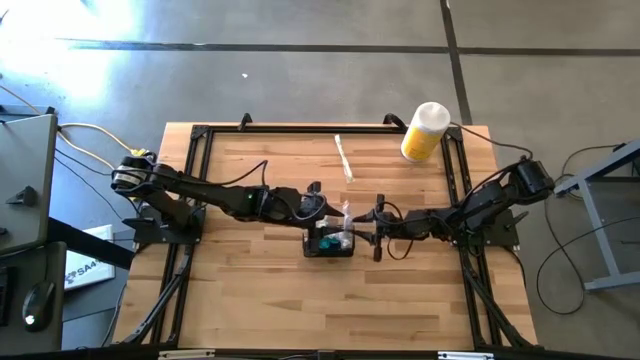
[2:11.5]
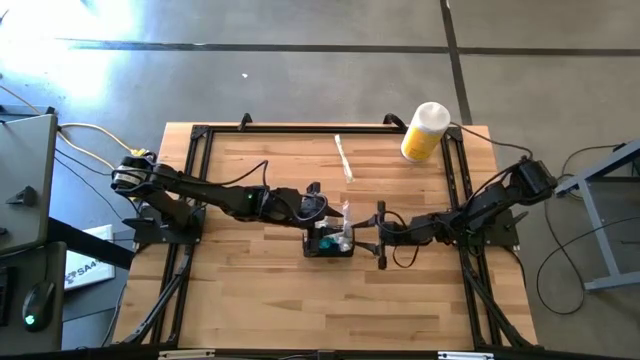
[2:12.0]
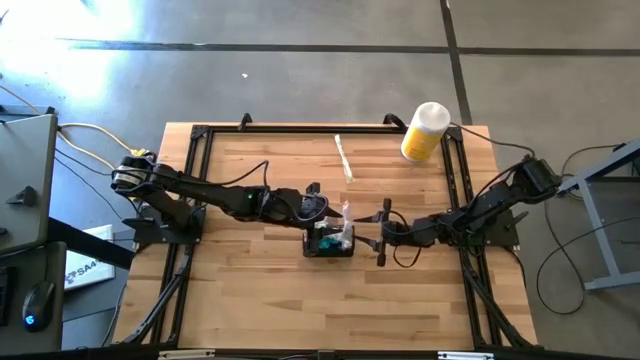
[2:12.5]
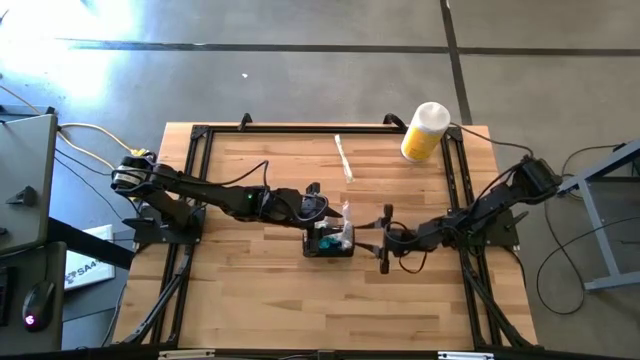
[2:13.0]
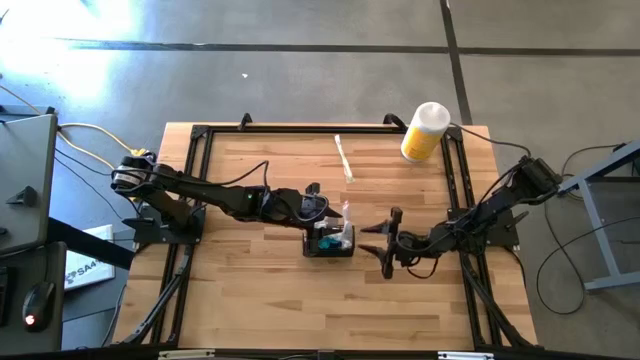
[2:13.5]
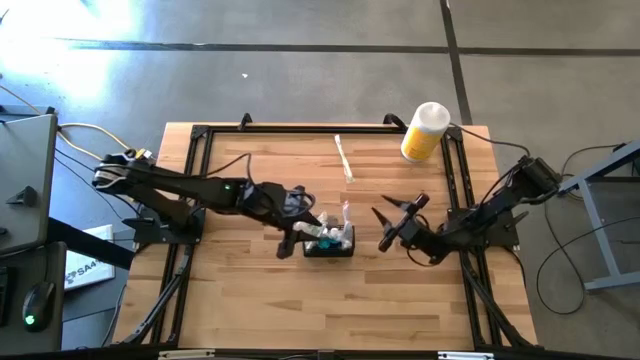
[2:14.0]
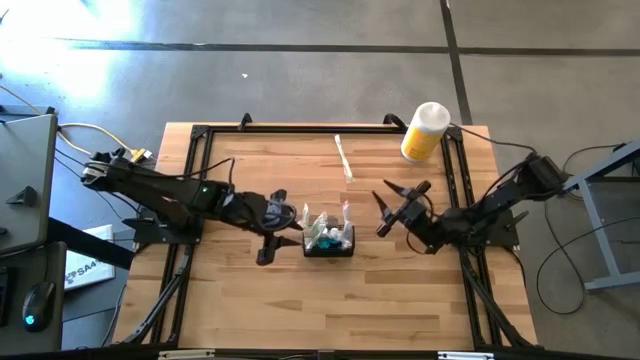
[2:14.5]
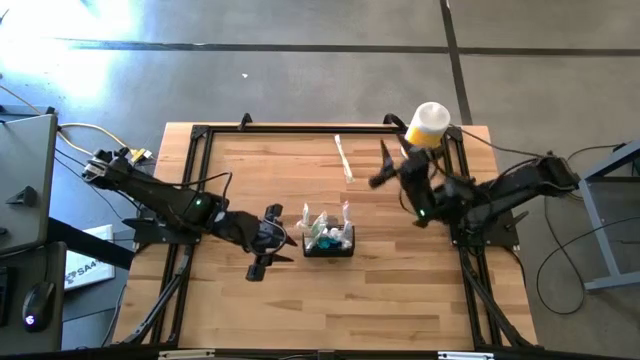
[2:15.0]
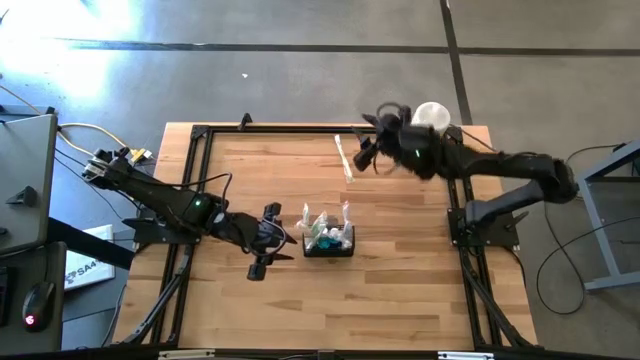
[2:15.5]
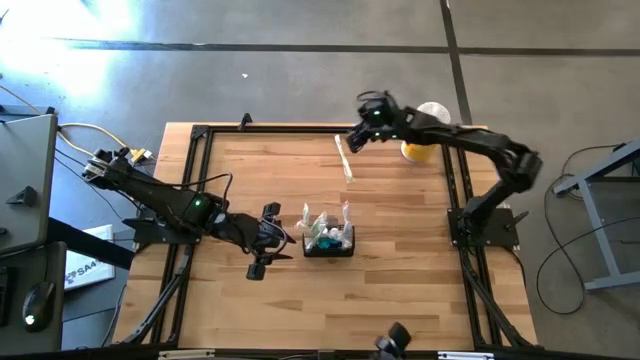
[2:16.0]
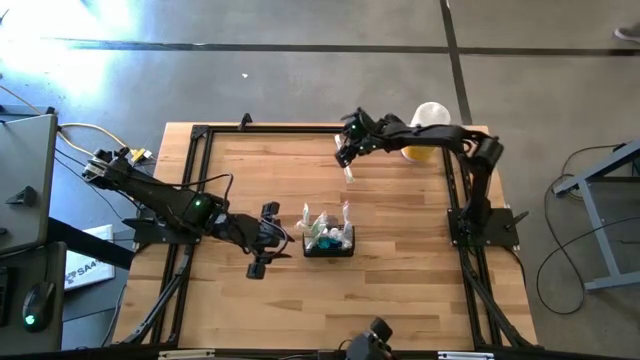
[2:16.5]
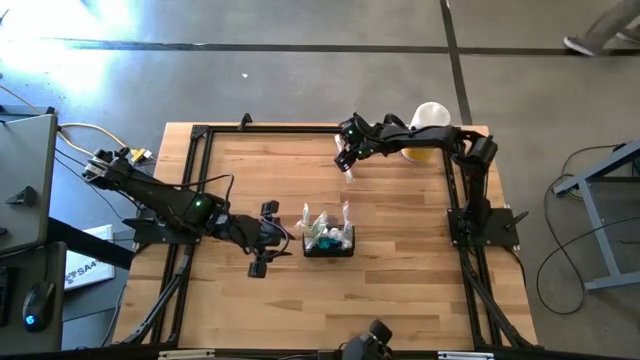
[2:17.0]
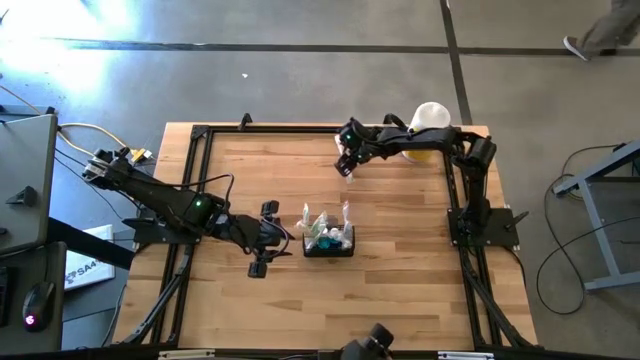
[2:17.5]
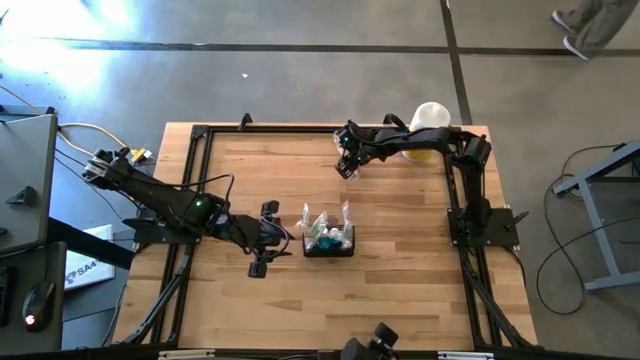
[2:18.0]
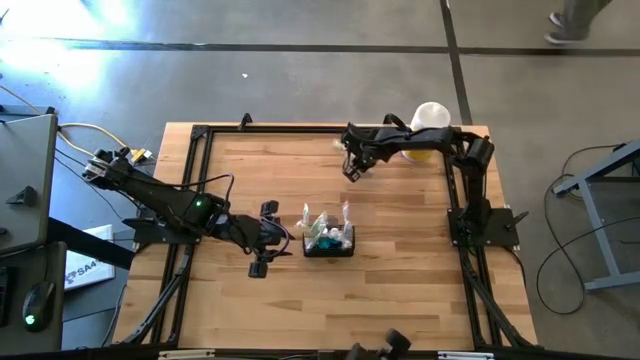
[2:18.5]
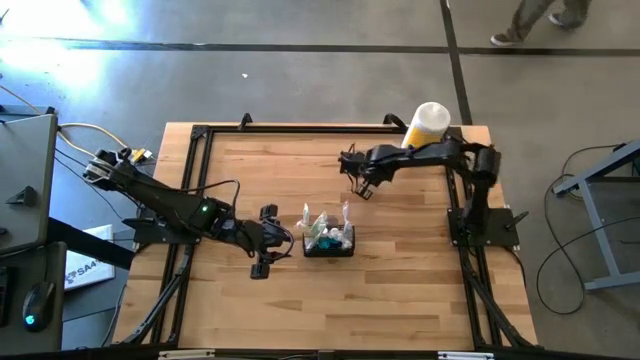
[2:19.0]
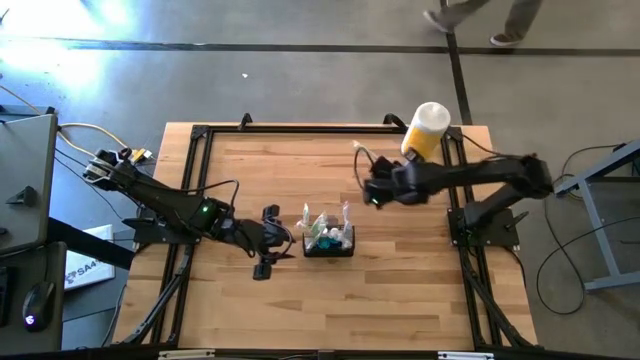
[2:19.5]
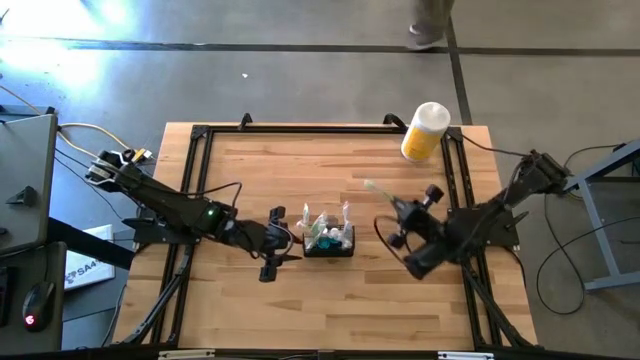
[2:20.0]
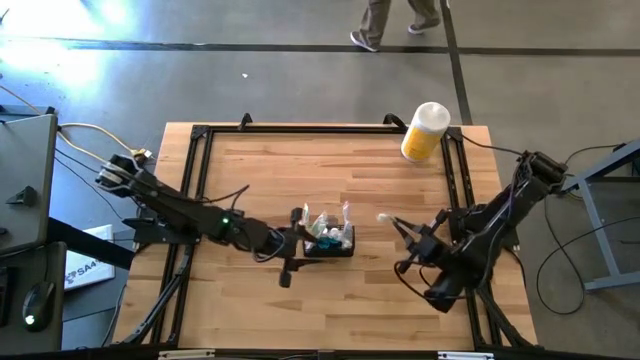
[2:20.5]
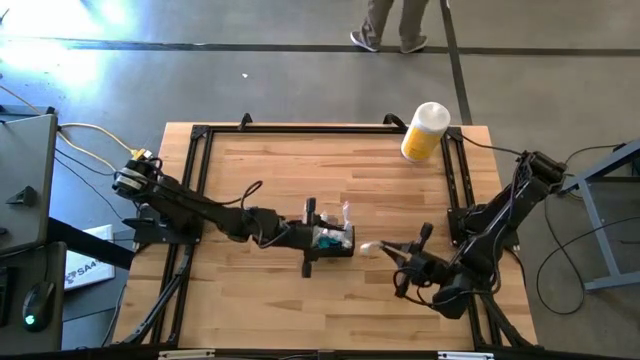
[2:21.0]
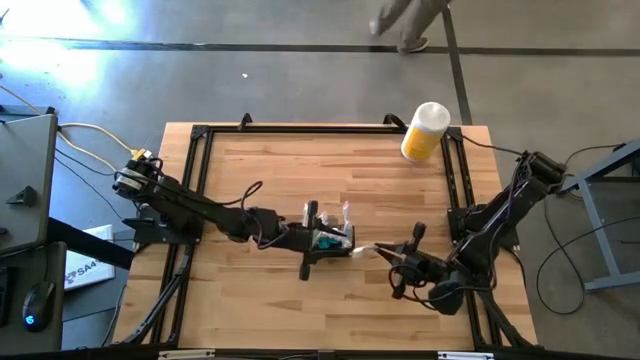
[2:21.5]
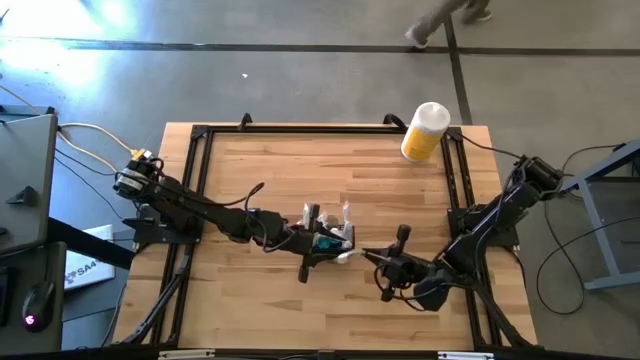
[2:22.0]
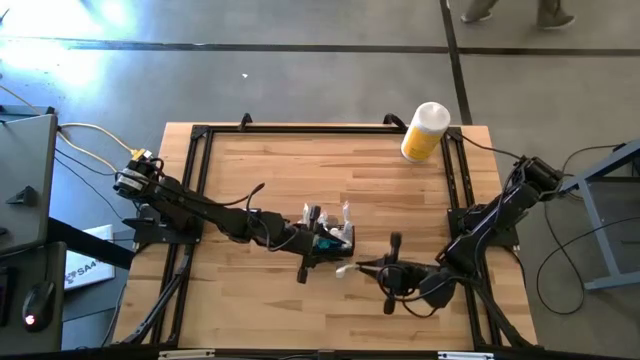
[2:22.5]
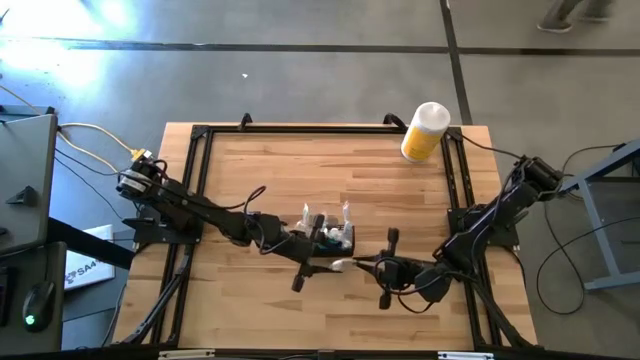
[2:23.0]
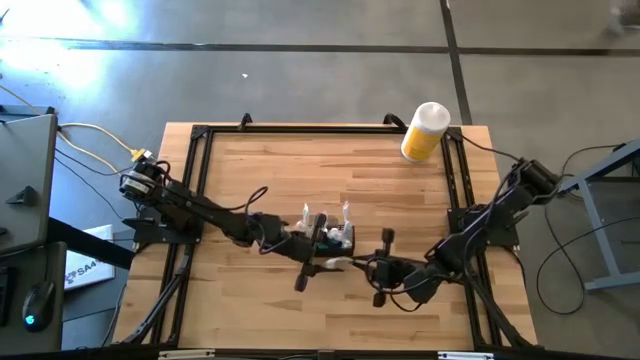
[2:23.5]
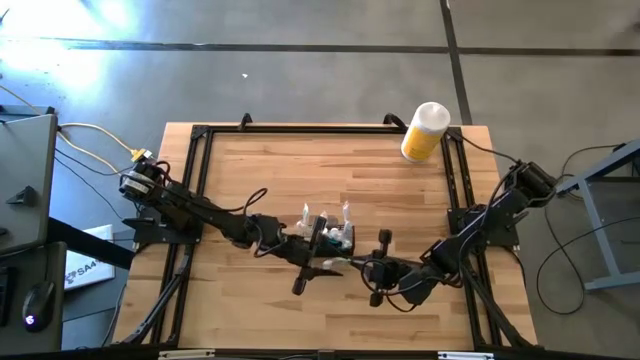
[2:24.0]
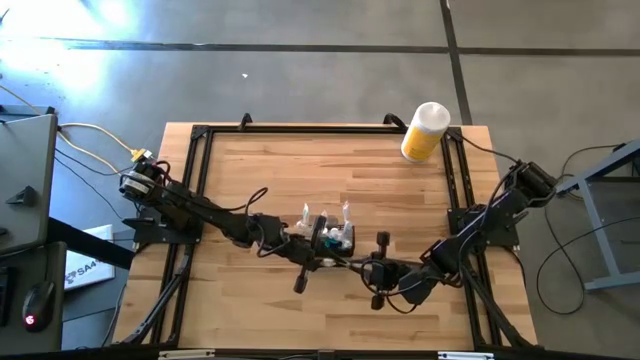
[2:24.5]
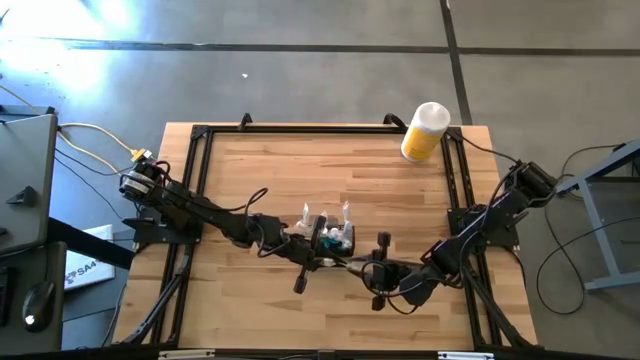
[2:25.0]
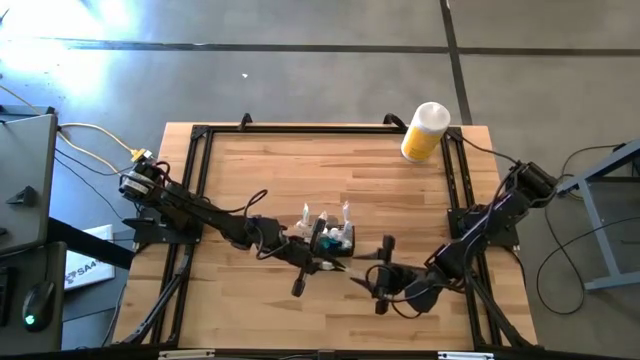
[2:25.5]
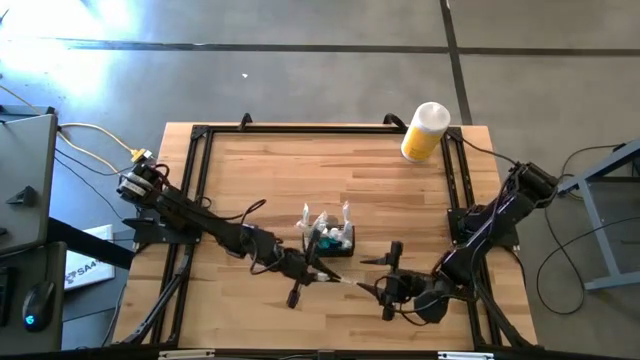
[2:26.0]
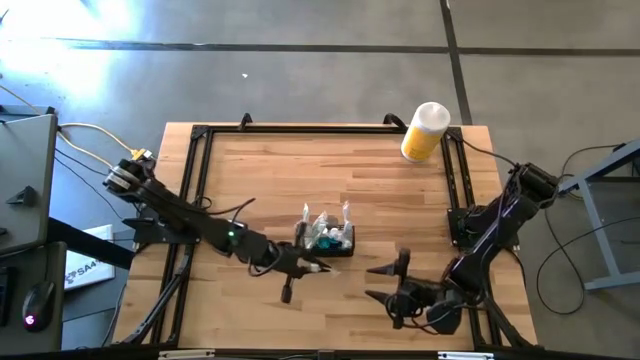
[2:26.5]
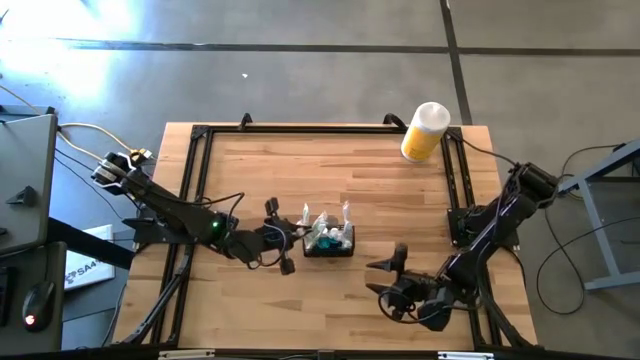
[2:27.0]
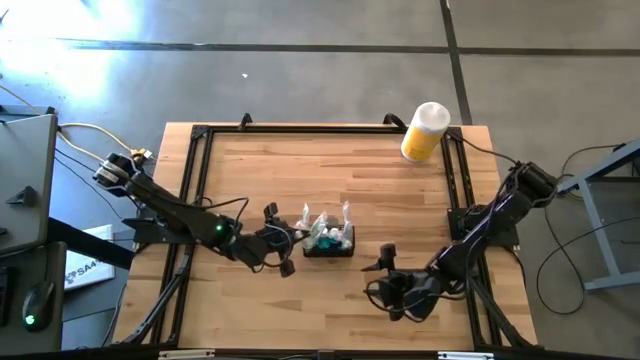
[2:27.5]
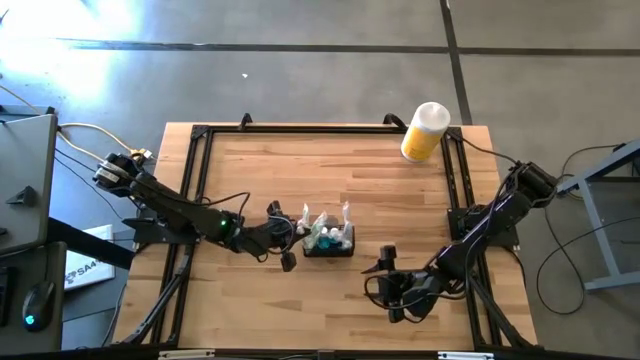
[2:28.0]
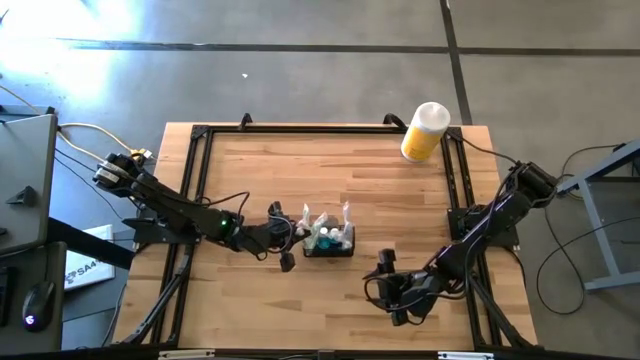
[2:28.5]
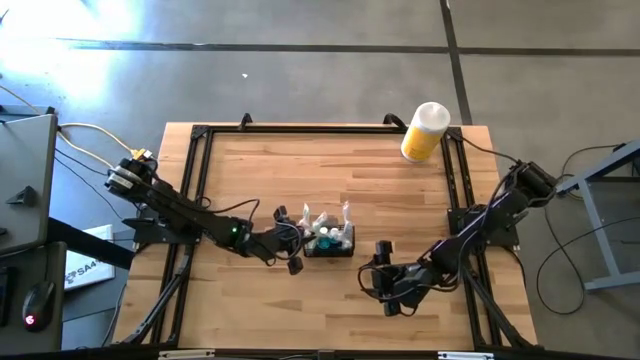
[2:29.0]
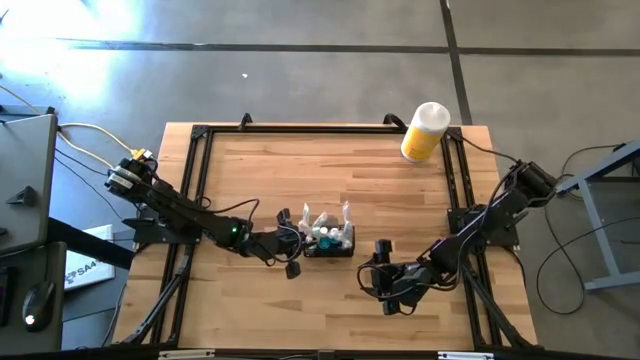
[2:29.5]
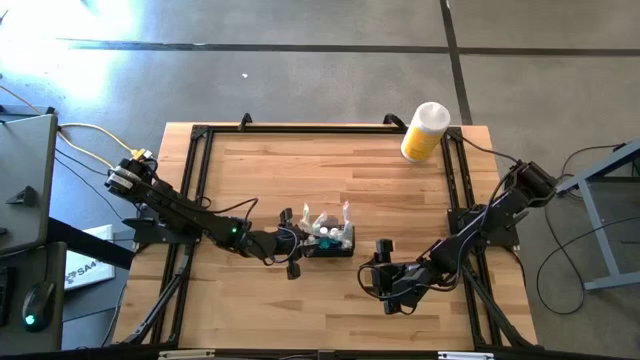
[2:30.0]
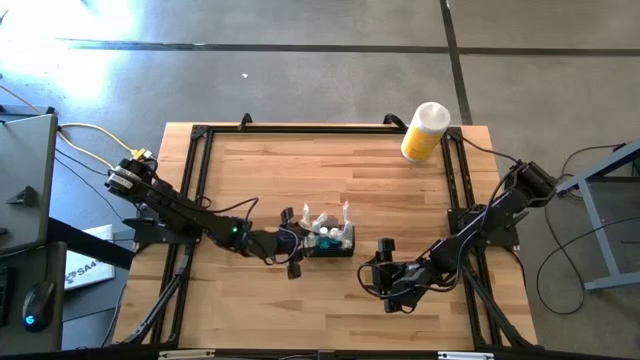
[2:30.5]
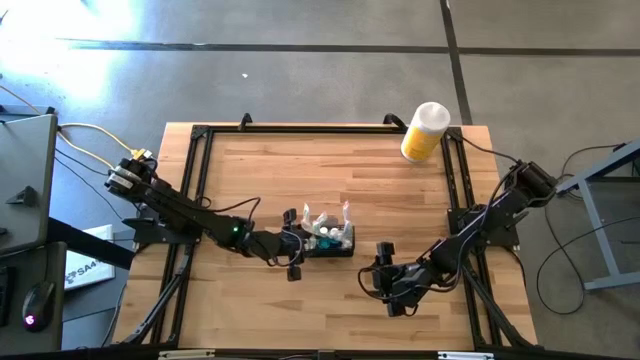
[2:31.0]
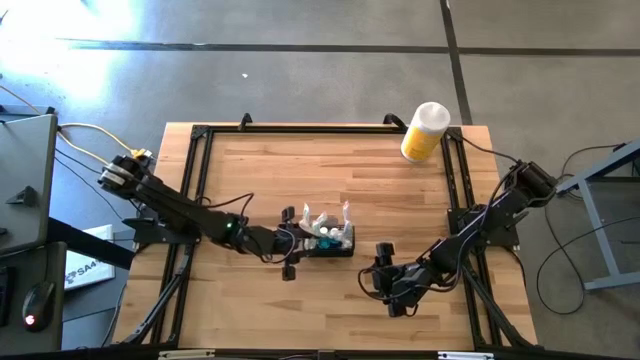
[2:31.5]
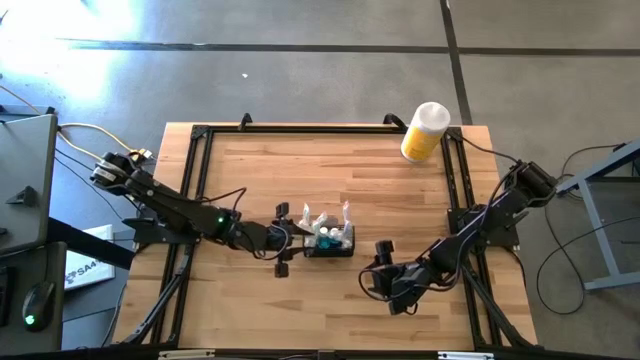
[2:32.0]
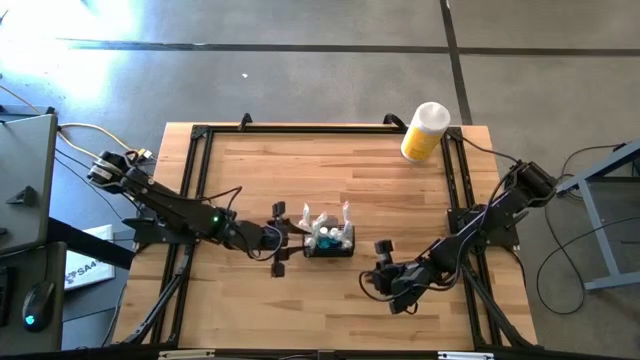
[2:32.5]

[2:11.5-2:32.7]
Task: Pick & Place toothbrushing station
Put the green toothbrush into the wire organizer
